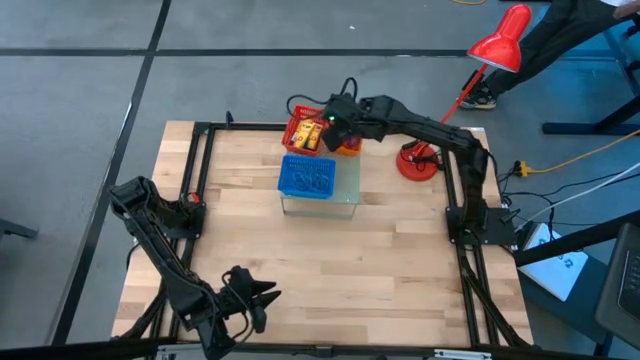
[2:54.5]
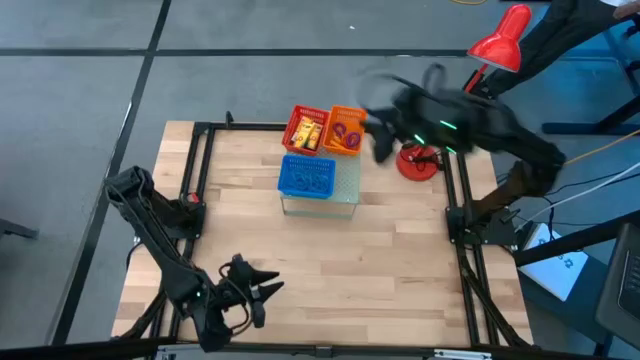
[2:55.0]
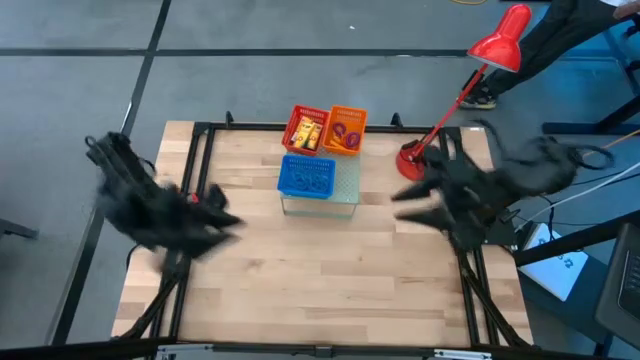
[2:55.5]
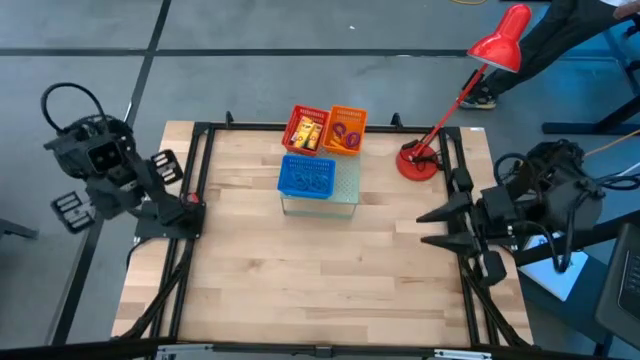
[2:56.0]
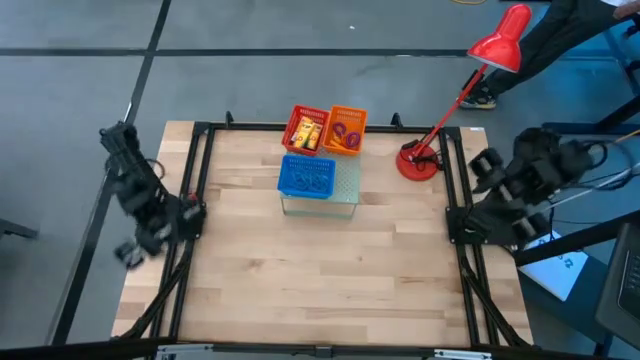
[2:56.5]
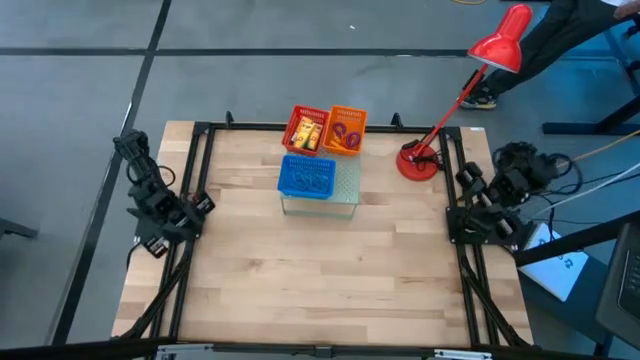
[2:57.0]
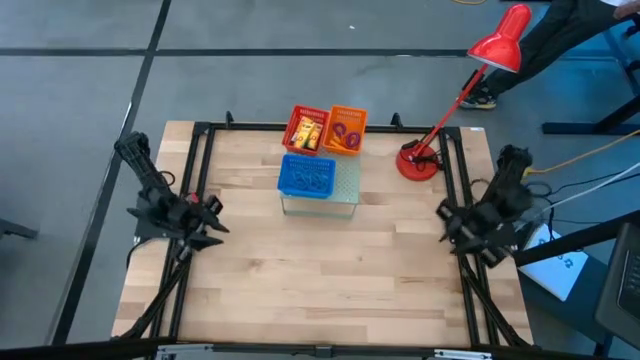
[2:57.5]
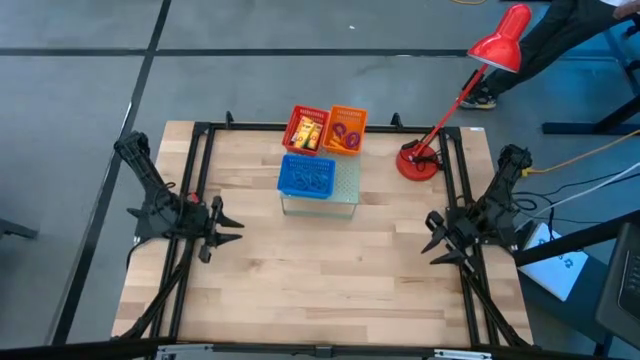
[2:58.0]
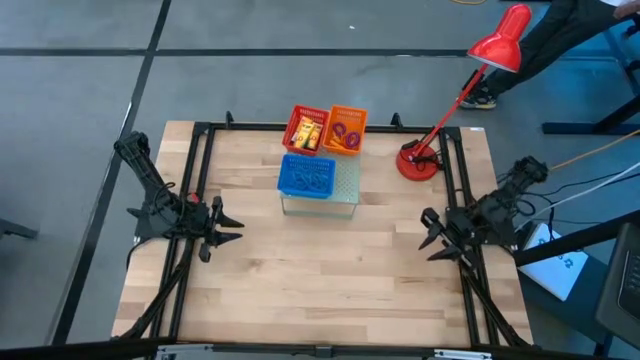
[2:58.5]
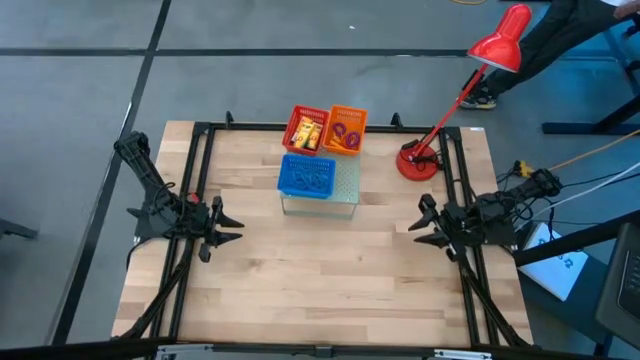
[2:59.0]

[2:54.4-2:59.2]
Task: Pick & Place Office Desk Supplies
Return to Home Position

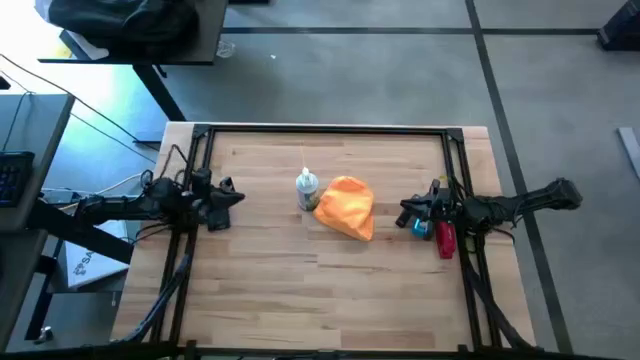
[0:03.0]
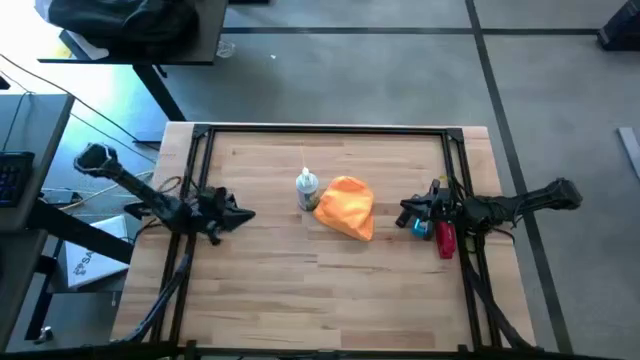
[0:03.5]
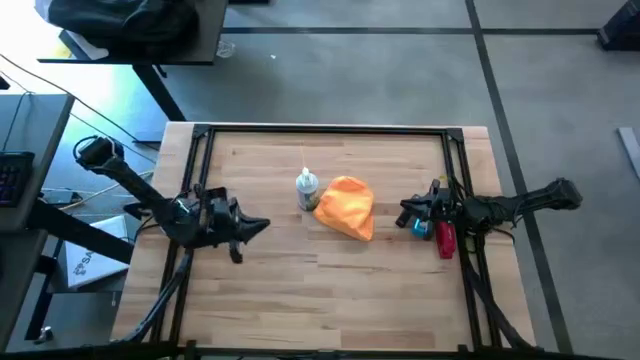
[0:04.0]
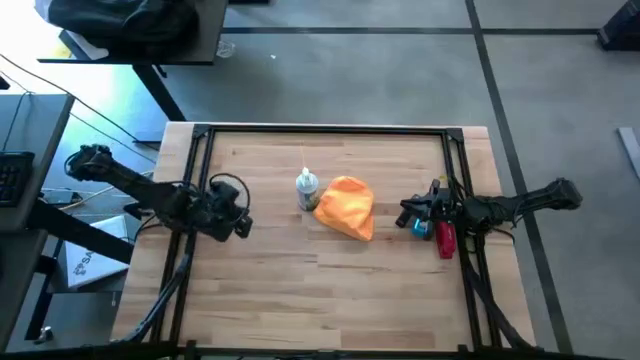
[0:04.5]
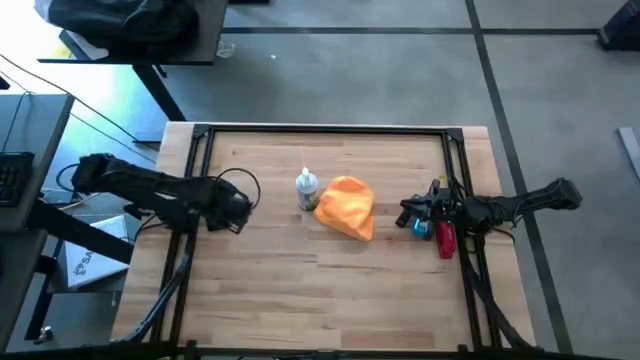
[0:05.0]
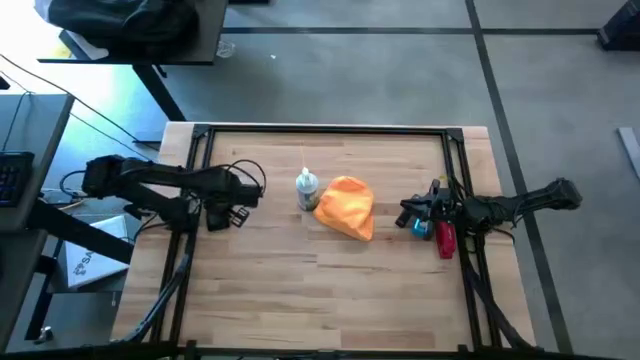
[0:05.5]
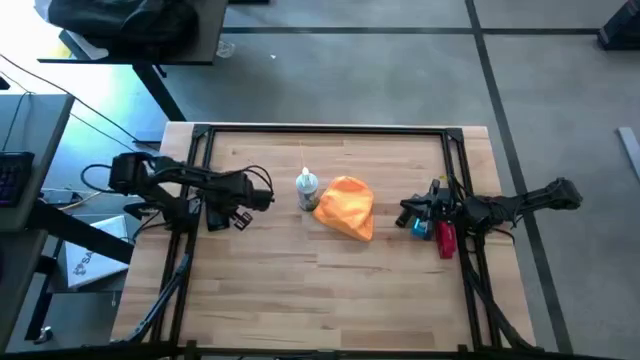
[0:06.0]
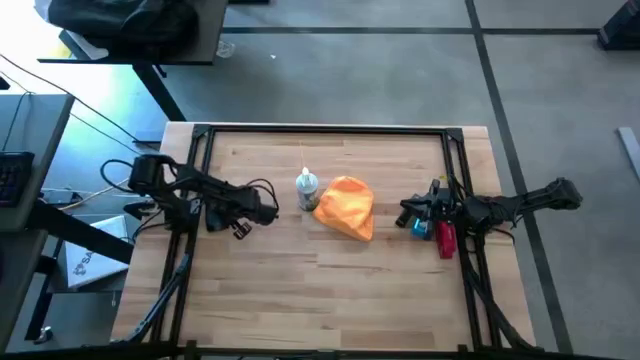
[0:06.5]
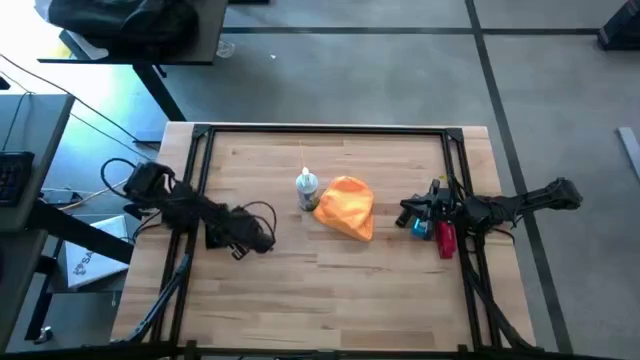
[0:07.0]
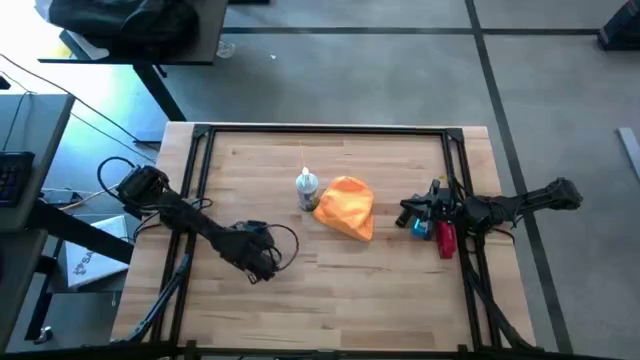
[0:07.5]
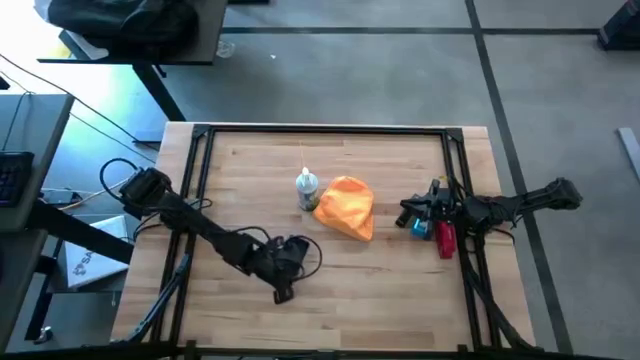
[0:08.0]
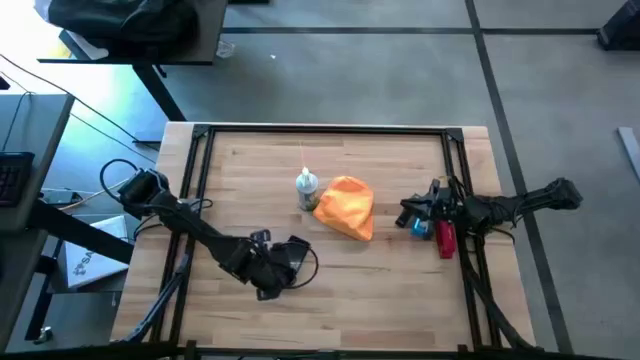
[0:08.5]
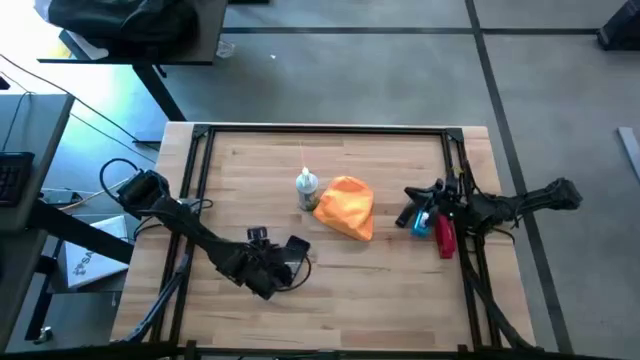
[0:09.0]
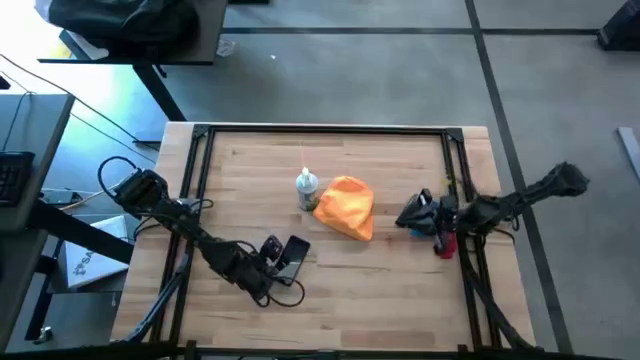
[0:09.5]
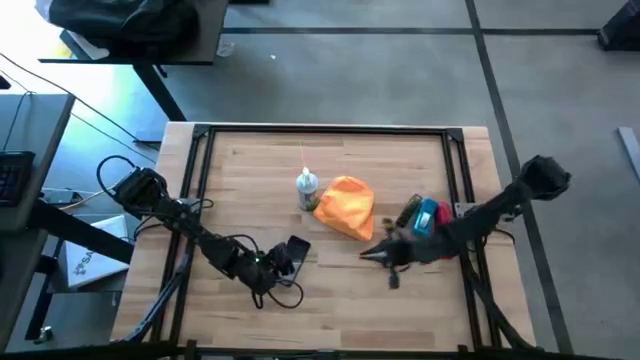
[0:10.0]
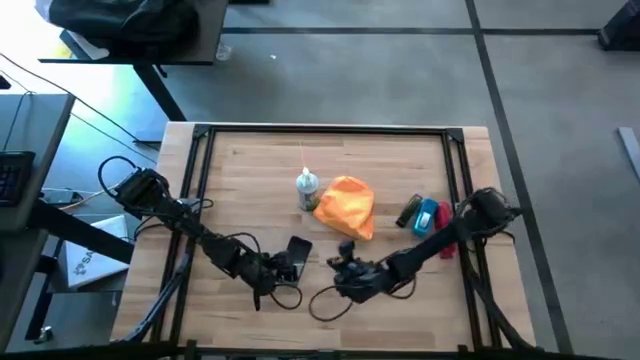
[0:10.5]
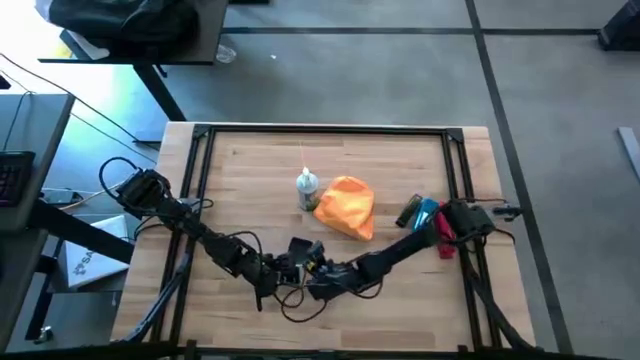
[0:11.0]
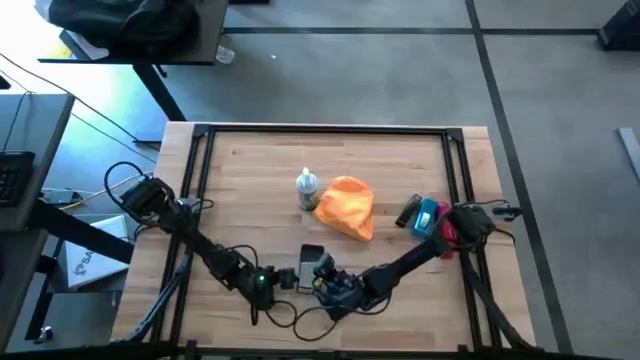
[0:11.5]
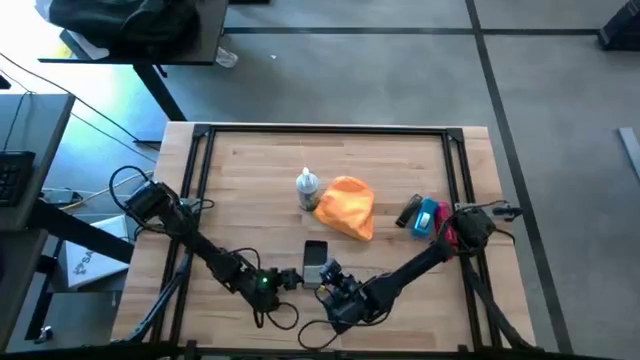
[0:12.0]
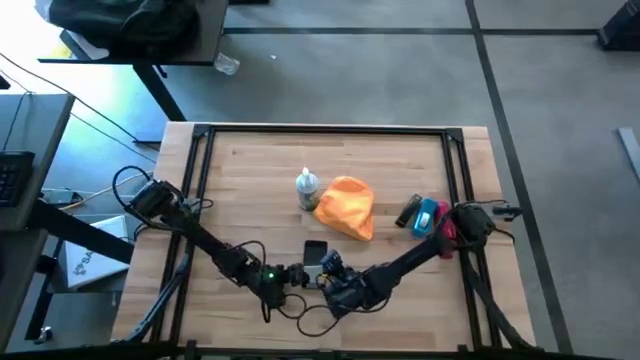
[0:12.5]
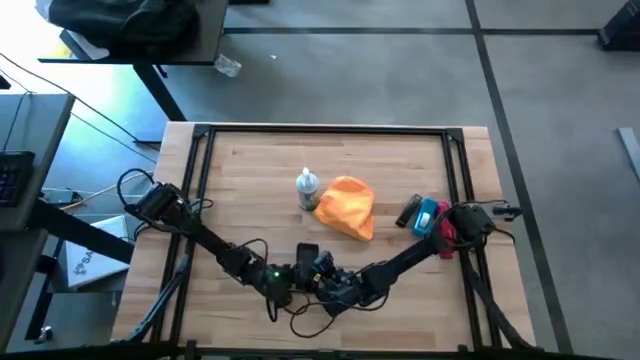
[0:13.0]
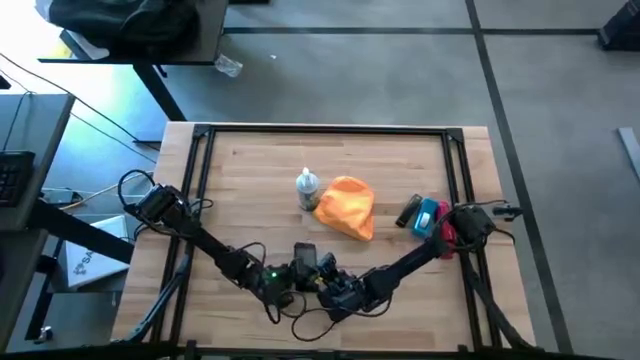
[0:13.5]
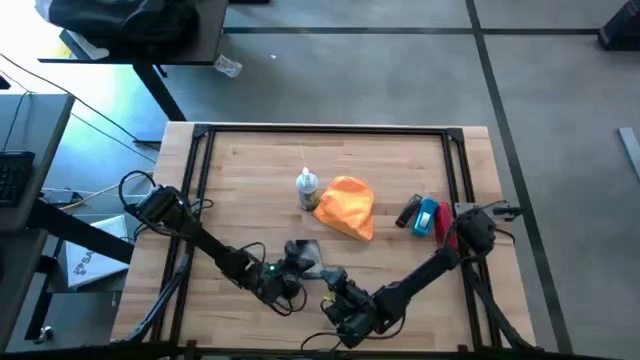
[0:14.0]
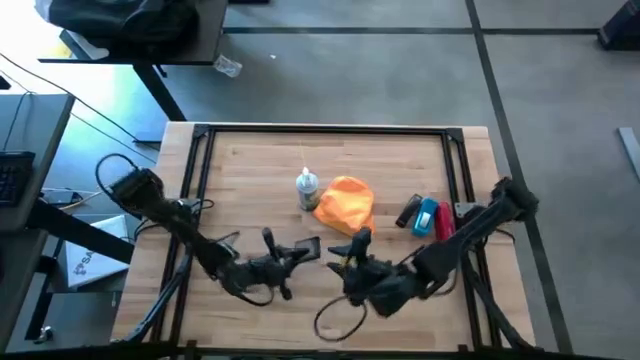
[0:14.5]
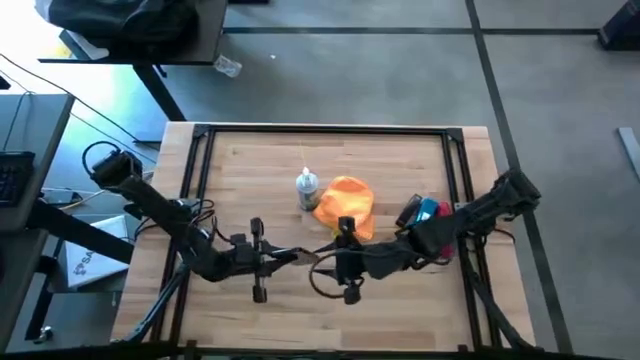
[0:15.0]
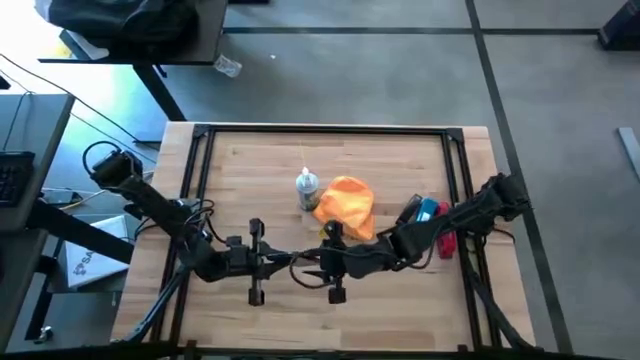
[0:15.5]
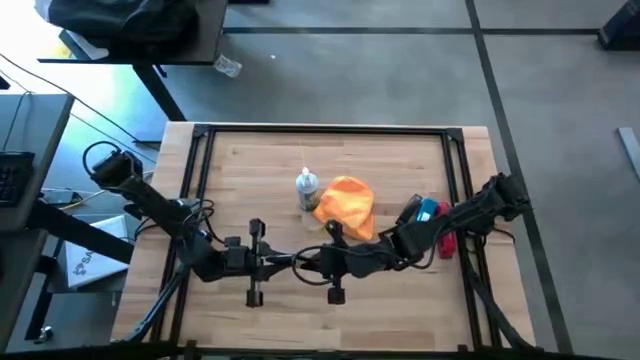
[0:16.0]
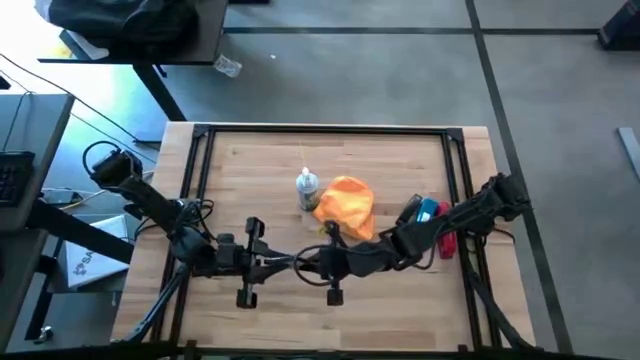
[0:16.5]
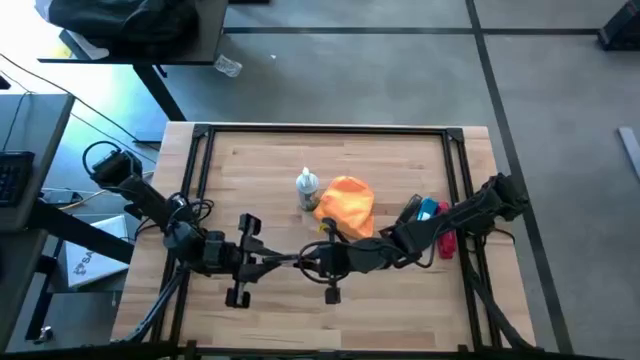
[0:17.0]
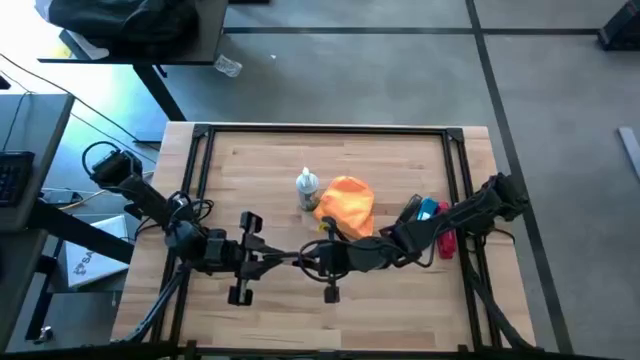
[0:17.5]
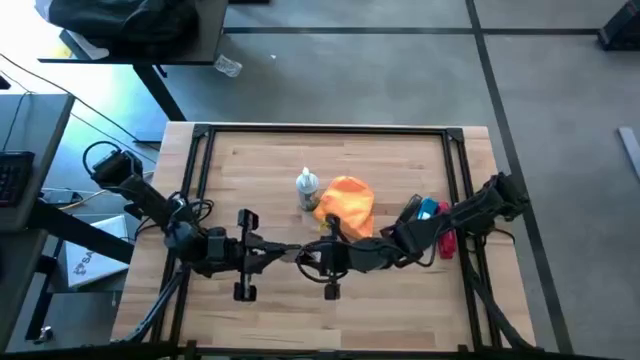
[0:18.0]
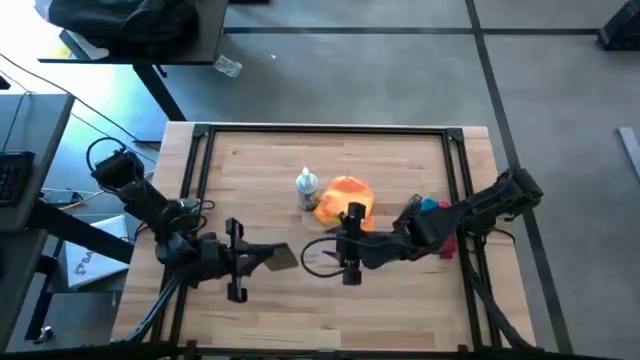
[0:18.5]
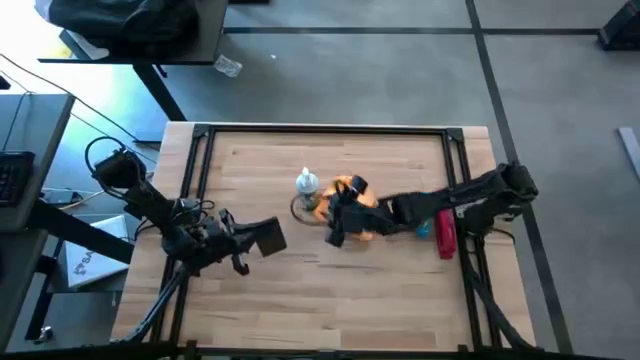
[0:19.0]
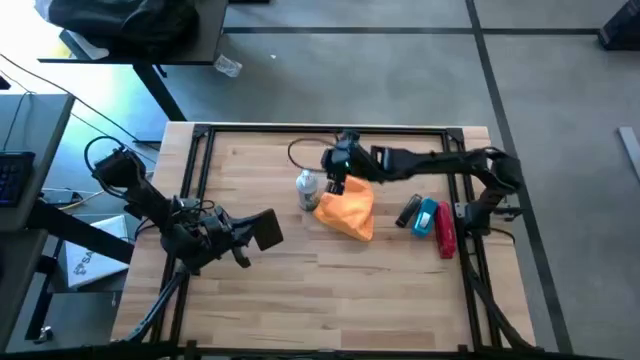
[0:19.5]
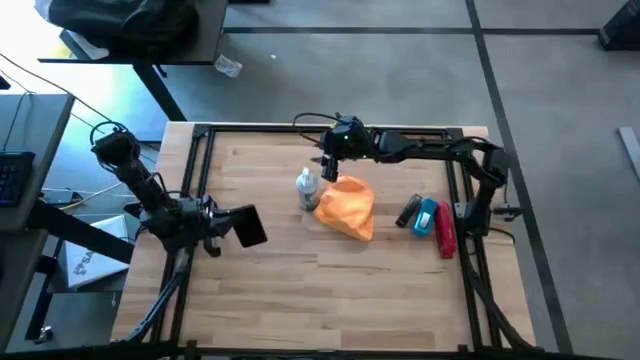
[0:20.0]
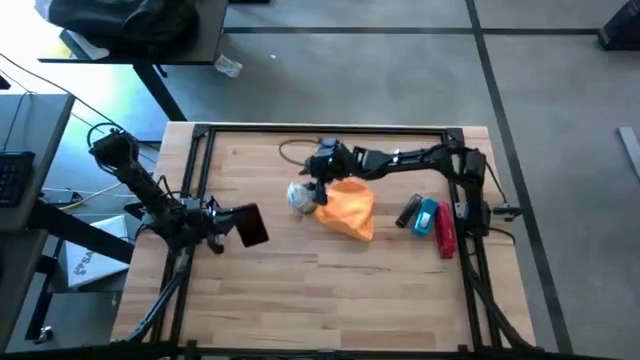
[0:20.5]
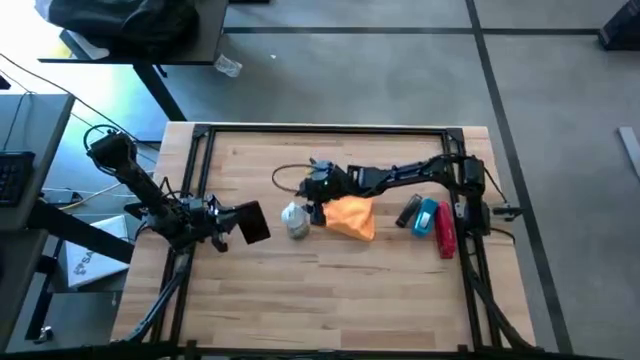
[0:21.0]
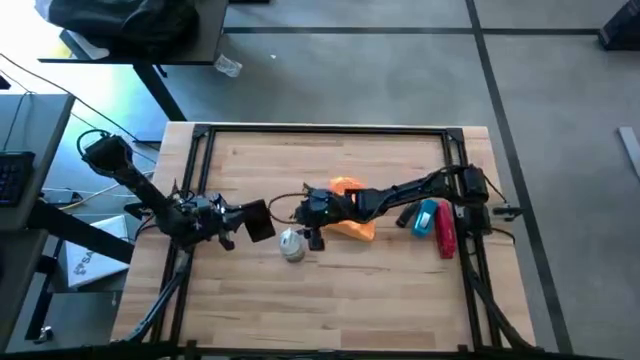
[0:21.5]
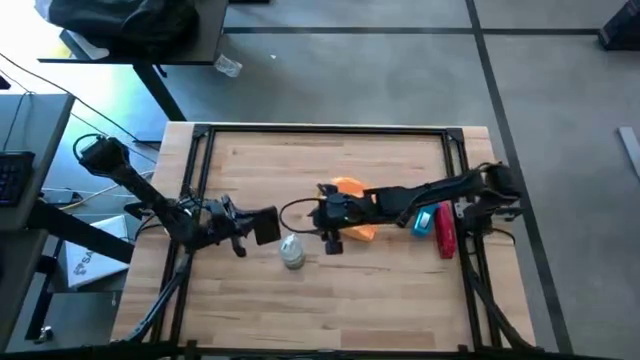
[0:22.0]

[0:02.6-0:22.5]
Task: Apply microfiber cloth
Spray the black cellphone using the spray bottle
